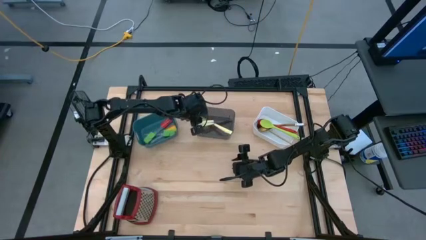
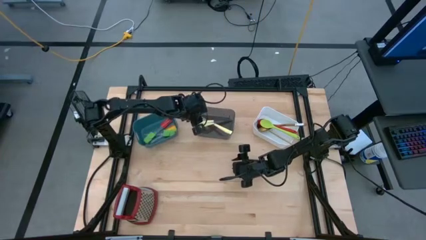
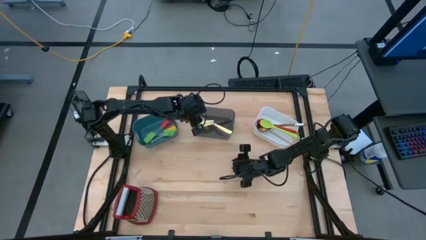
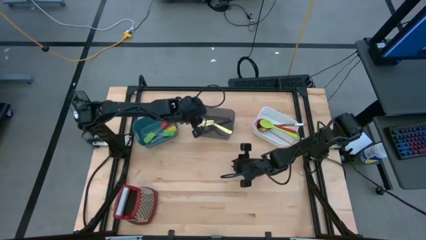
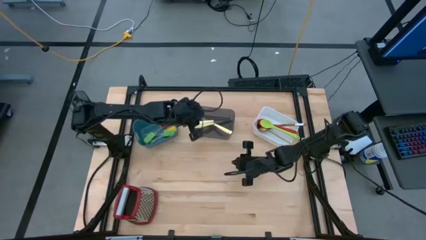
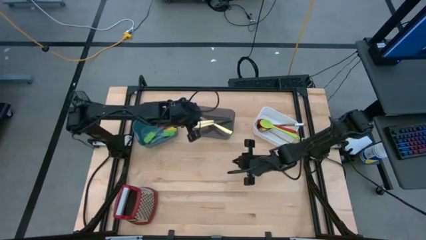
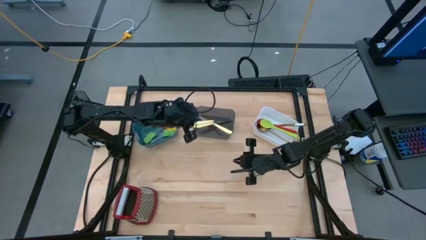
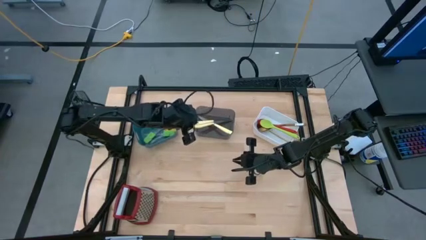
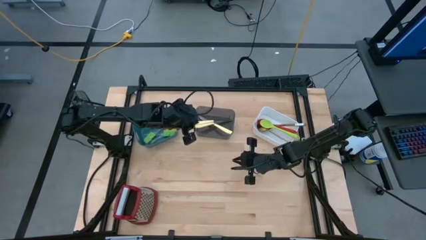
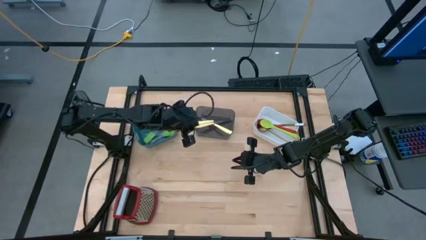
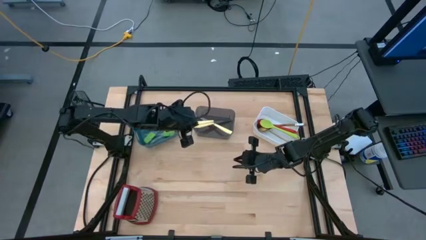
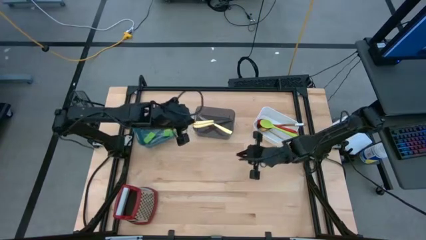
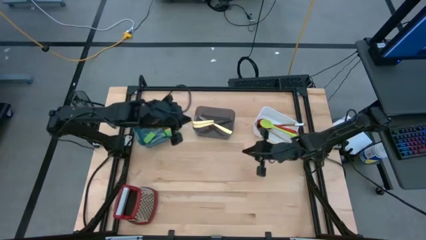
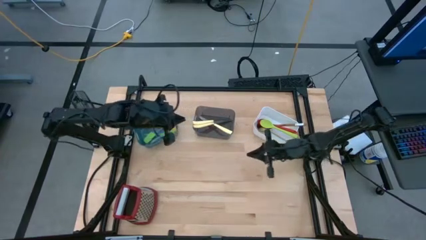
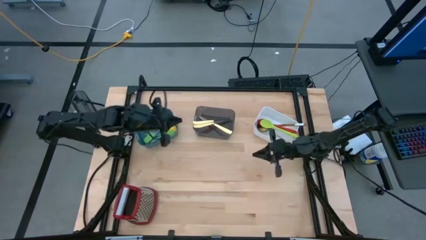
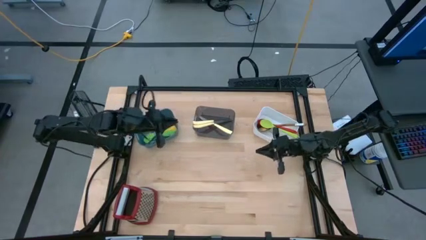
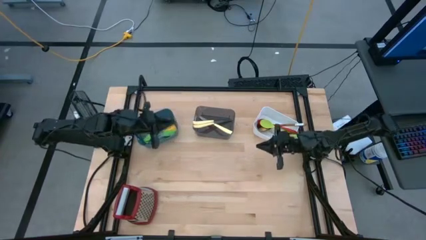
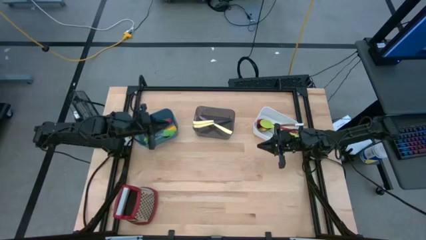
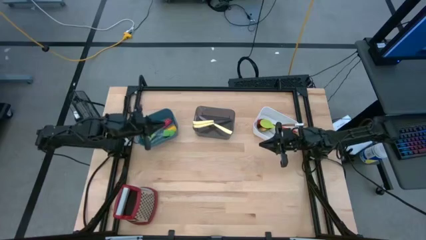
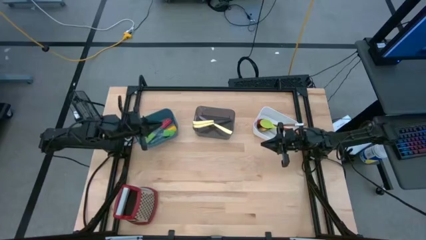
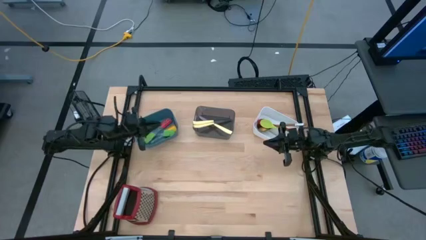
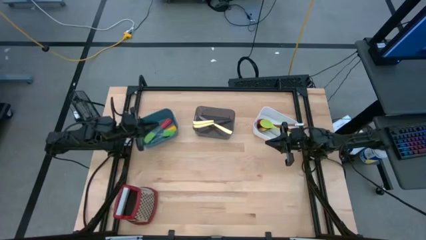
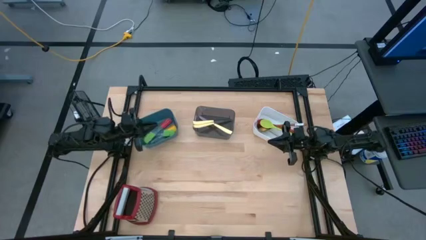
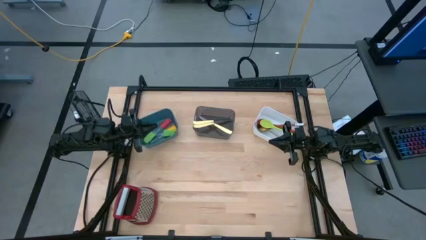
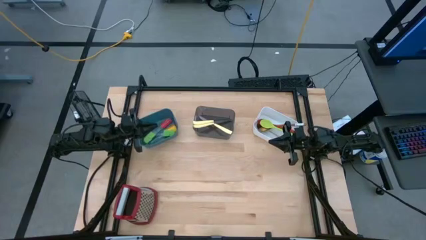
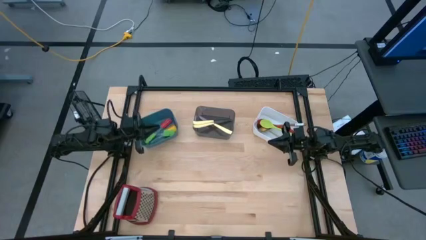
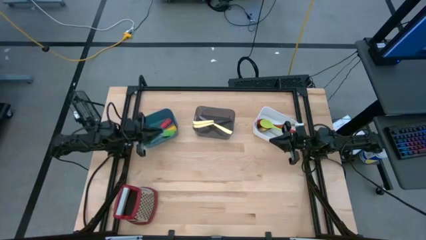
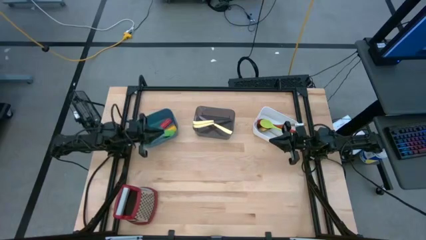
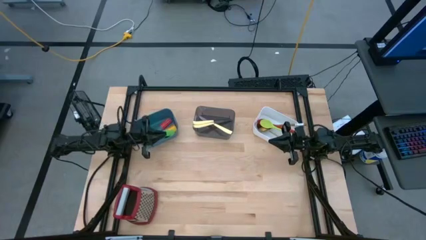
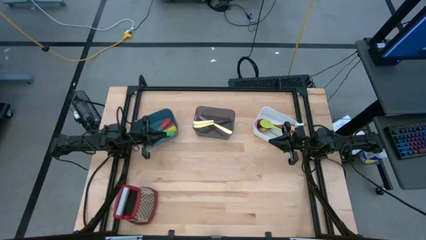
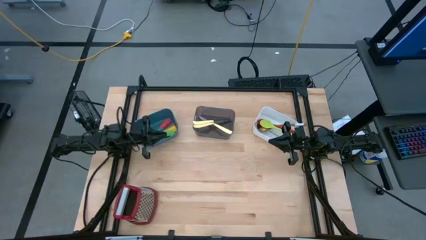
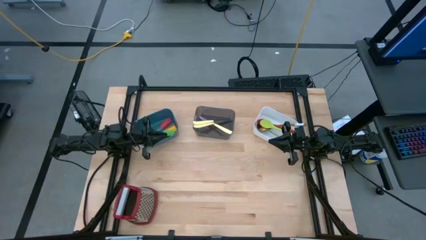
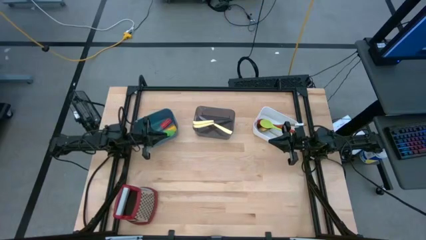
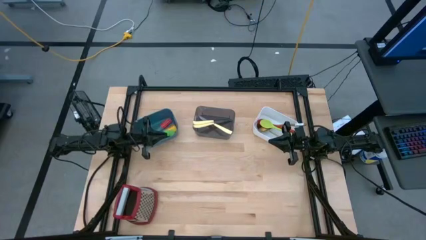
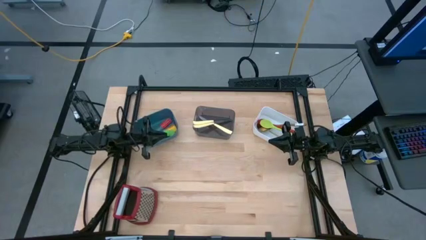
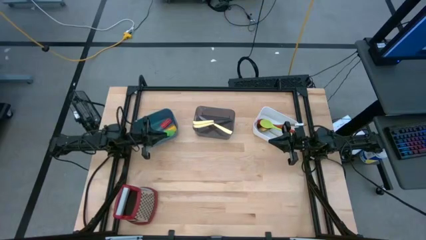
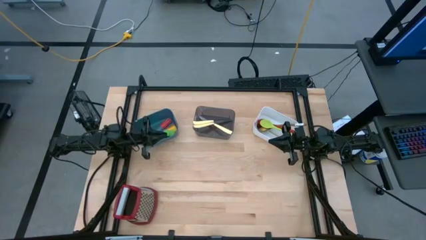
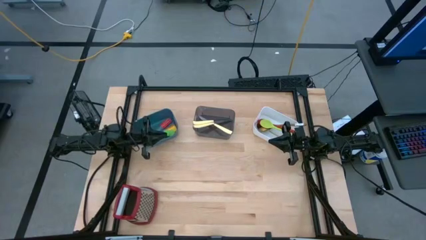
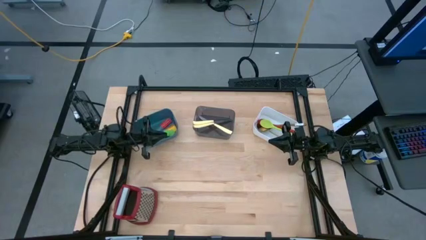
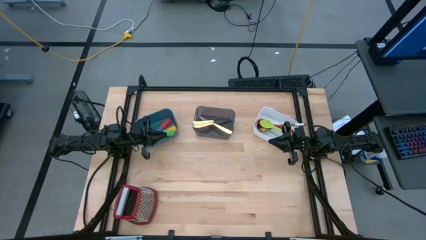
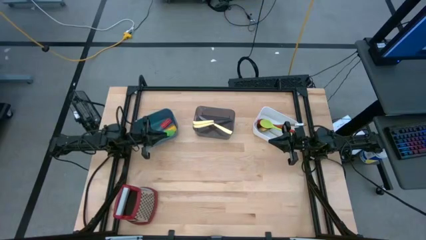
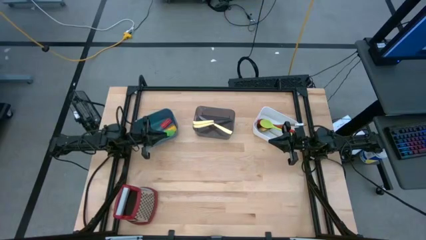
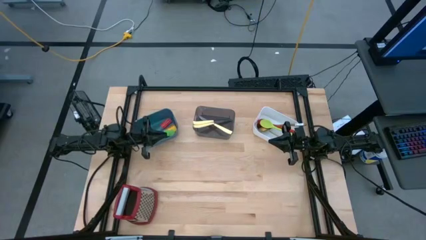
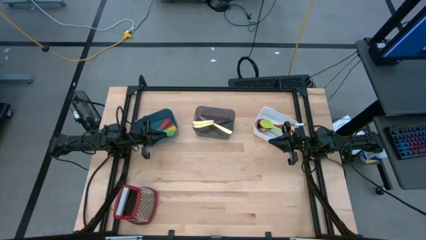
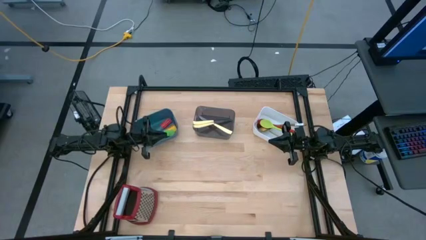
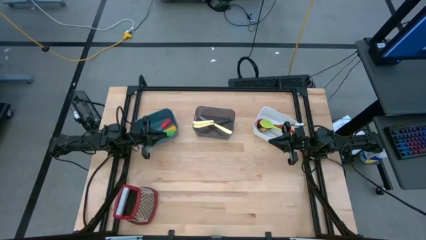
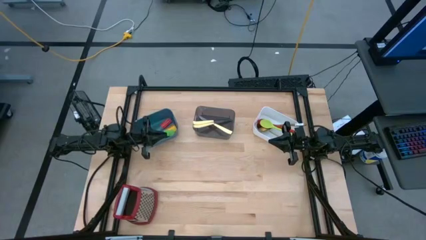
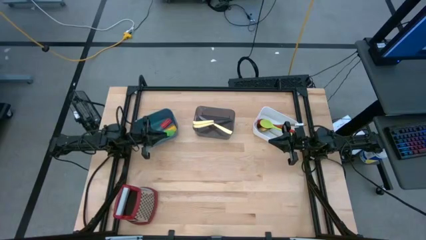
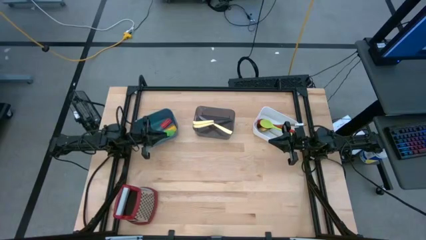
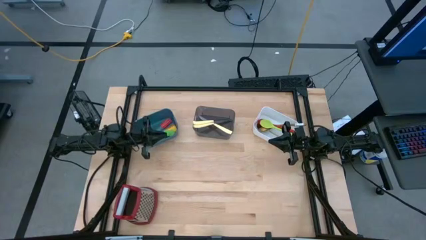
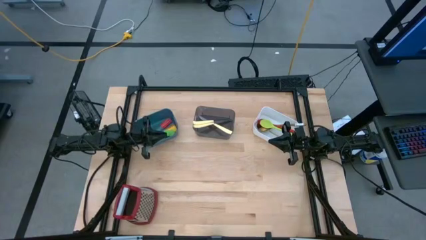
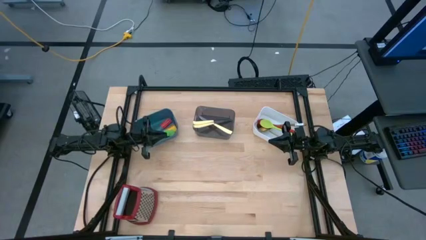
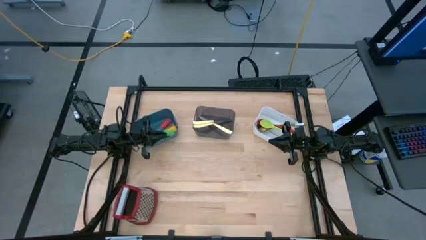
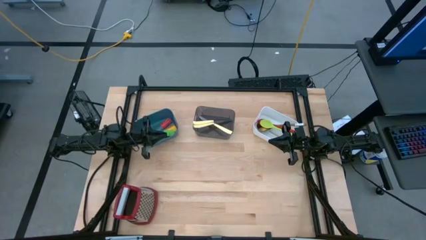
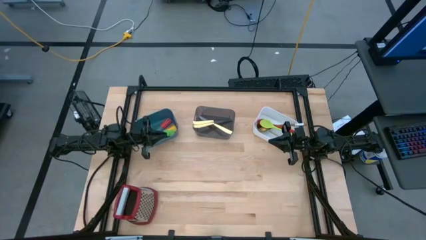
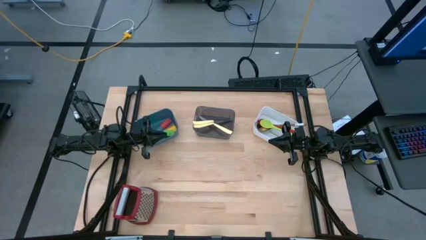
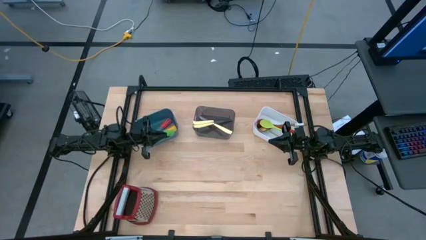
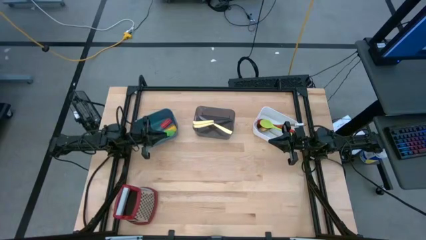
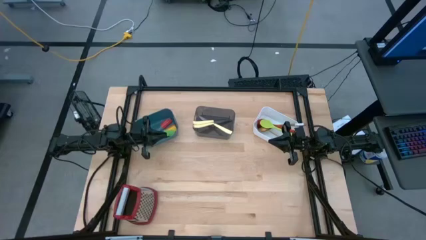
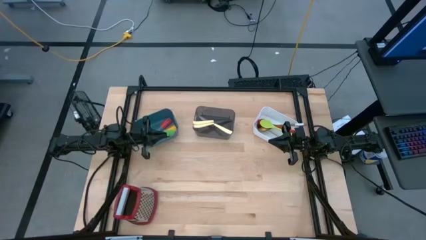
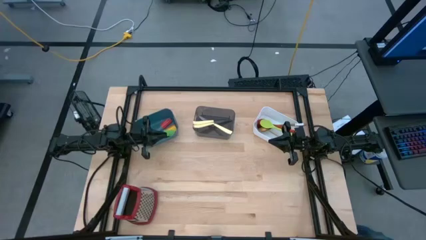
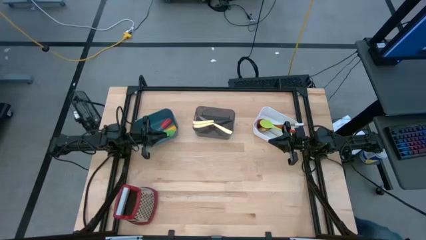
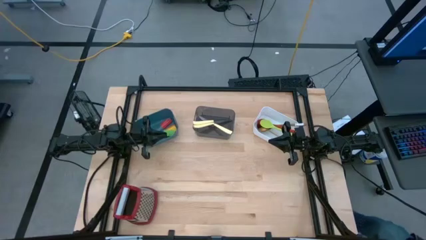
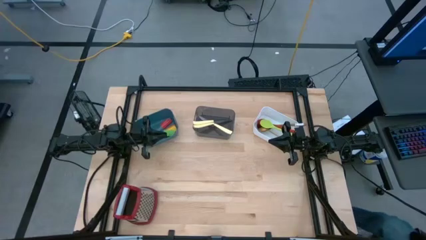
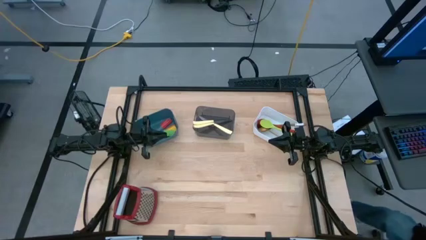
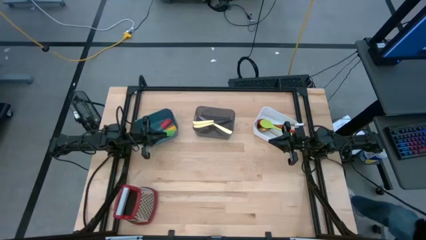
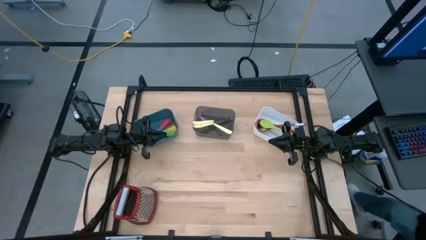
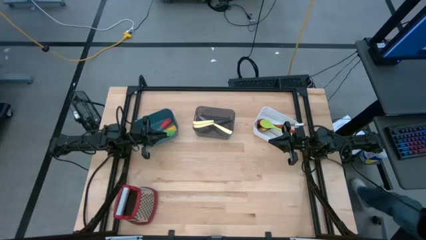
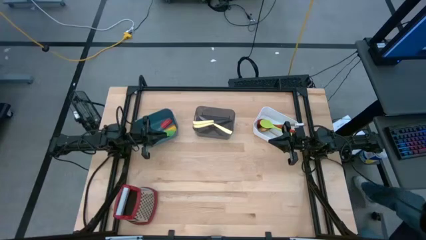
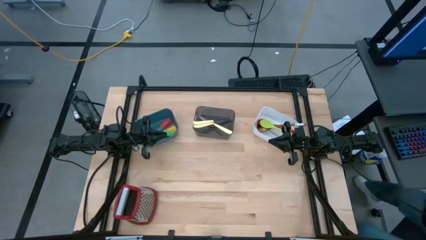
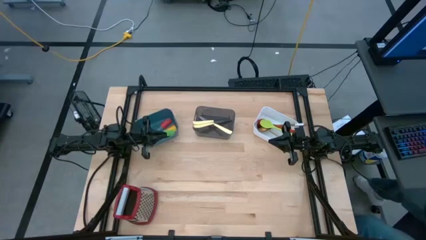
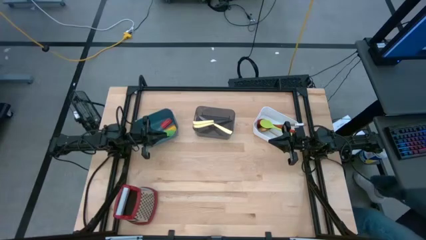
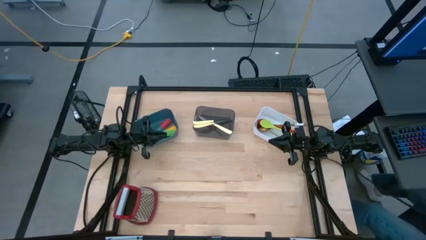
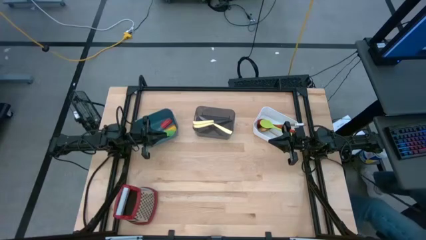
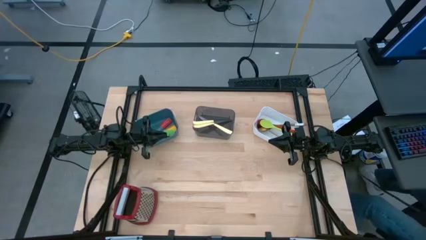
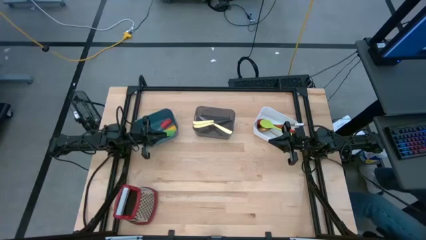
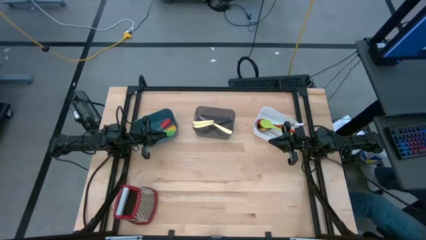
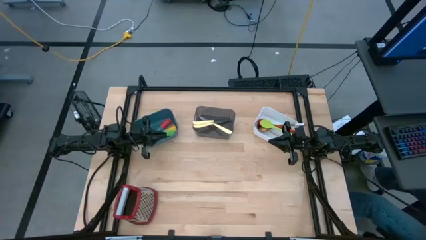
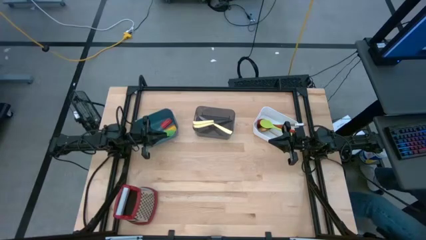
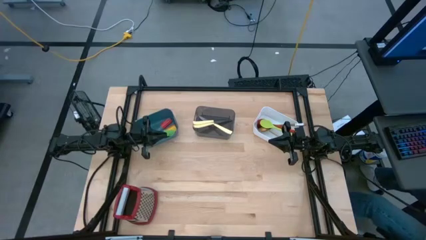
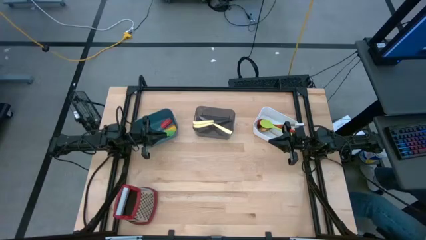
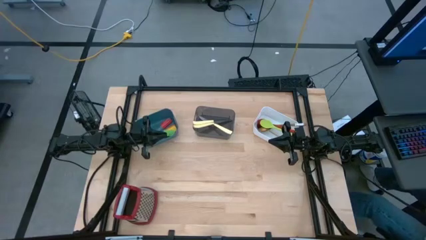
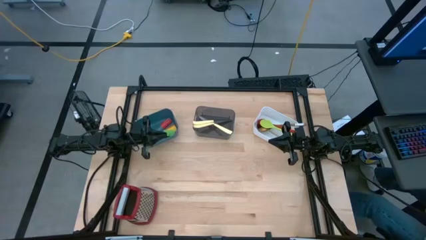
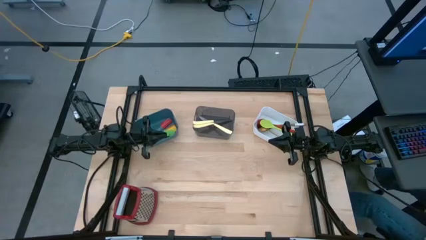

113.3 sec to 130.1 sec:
Task: Pick & Place Kitchen Items
Return to Home Position
